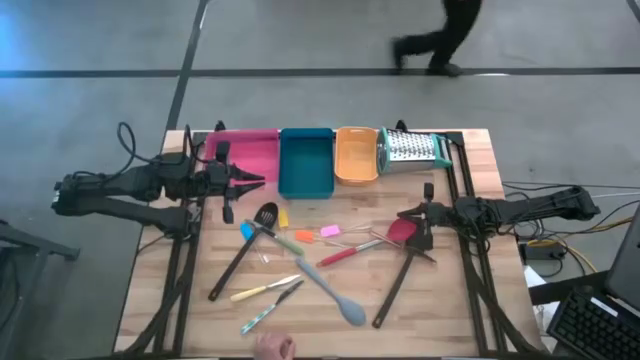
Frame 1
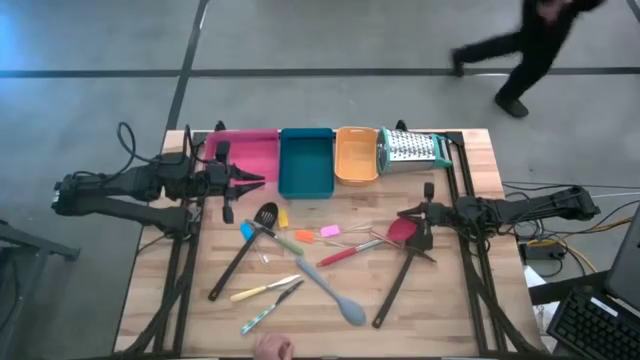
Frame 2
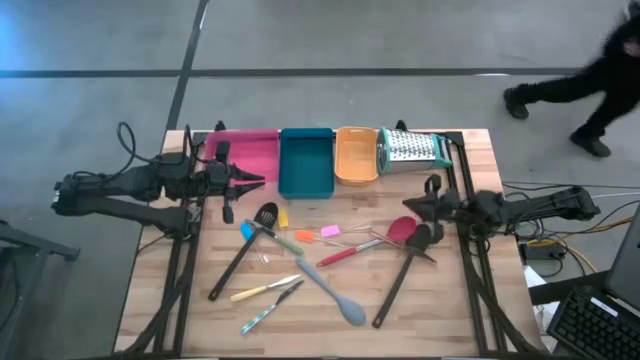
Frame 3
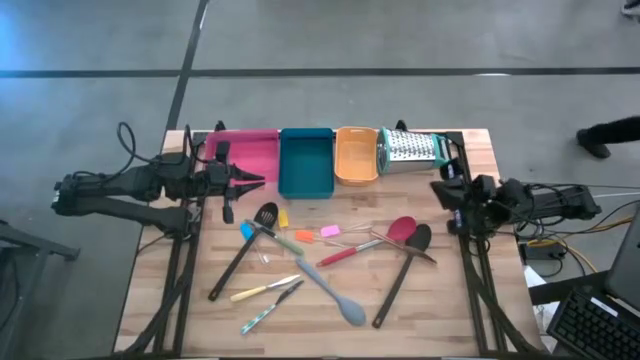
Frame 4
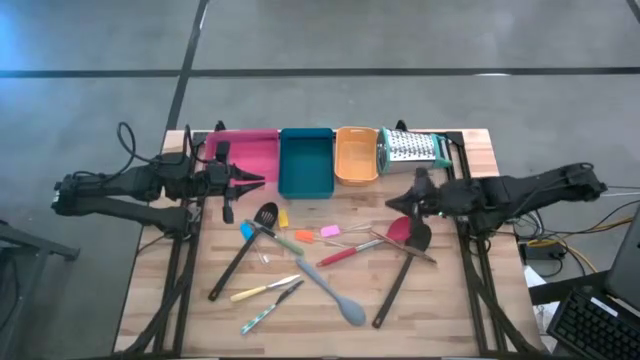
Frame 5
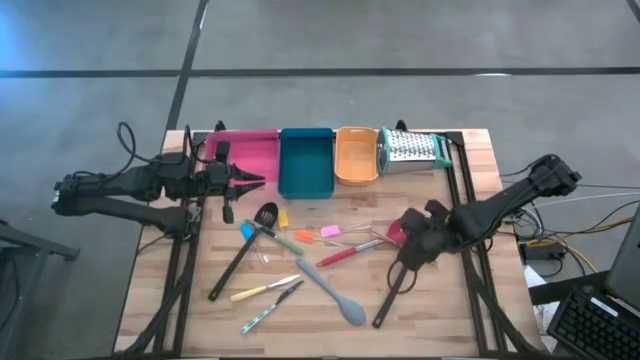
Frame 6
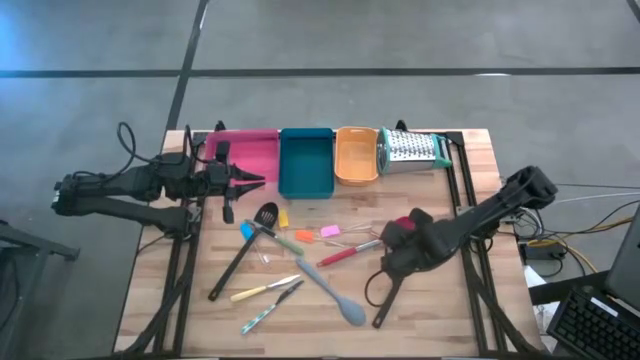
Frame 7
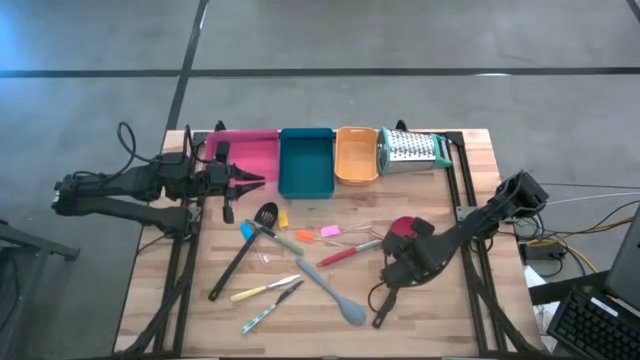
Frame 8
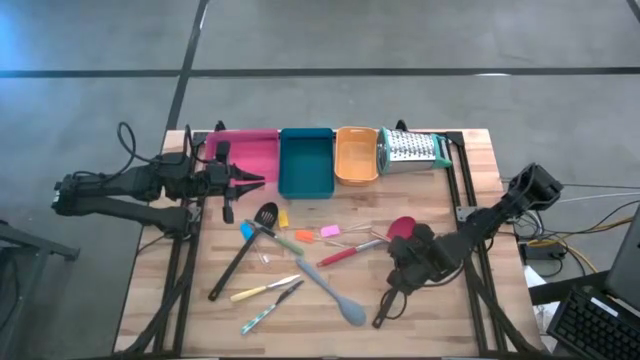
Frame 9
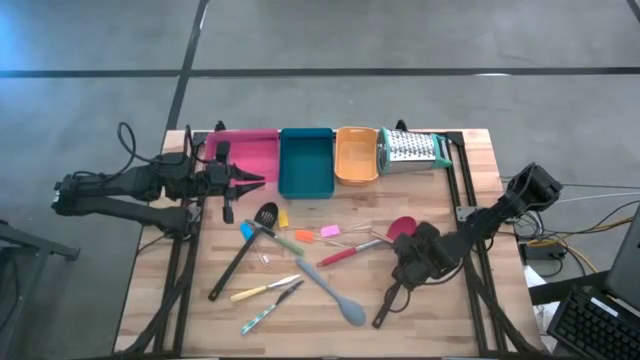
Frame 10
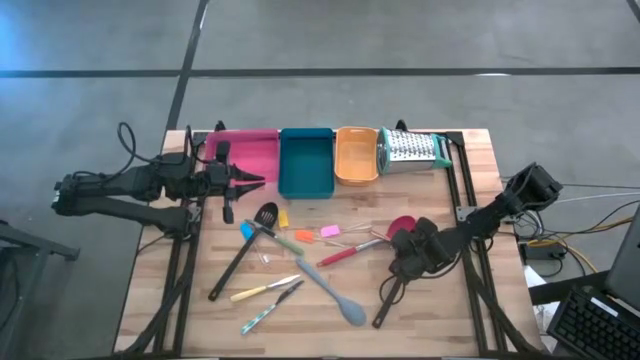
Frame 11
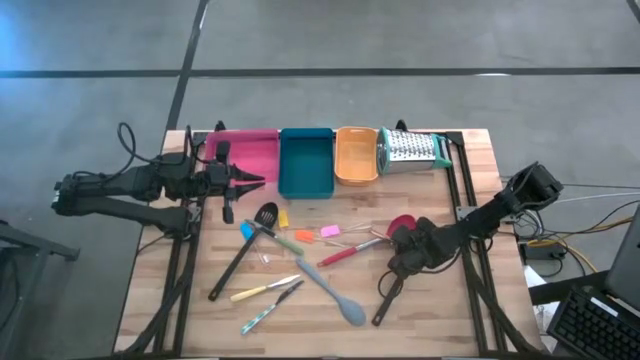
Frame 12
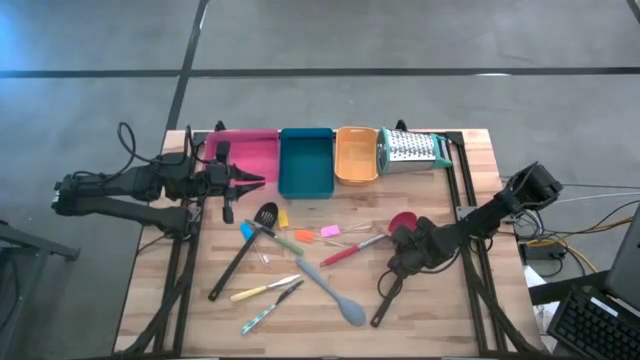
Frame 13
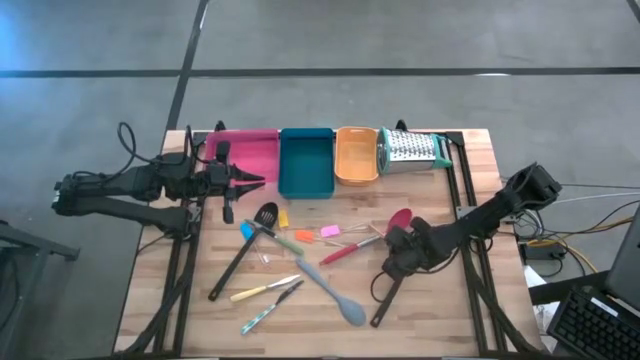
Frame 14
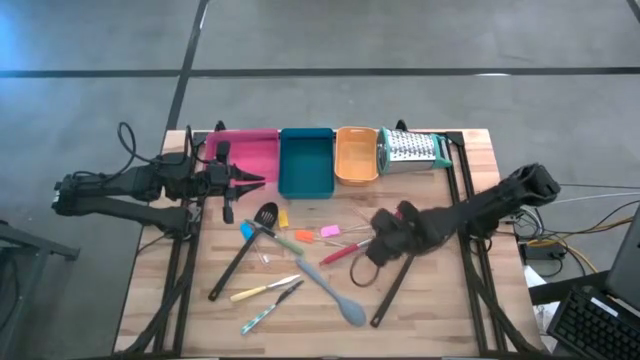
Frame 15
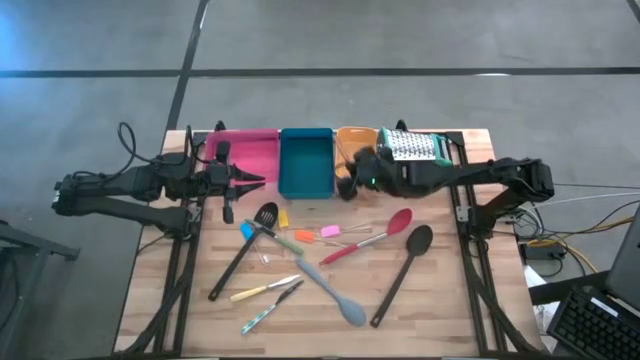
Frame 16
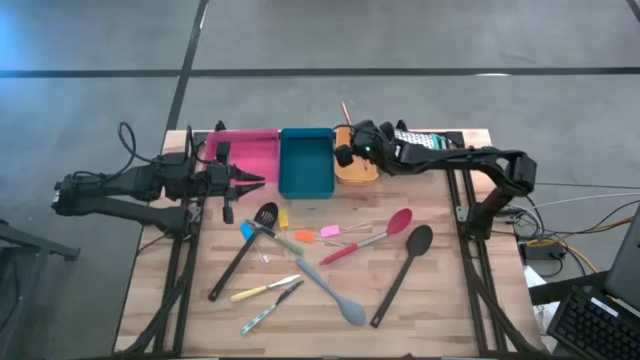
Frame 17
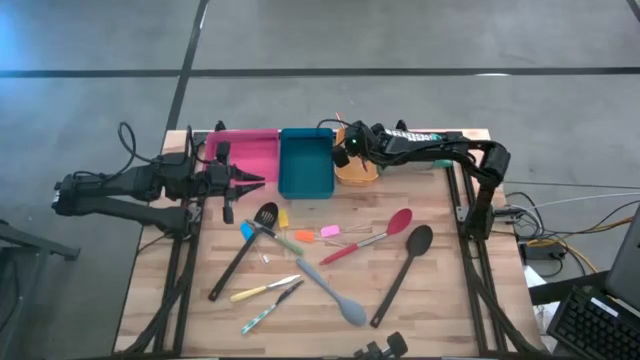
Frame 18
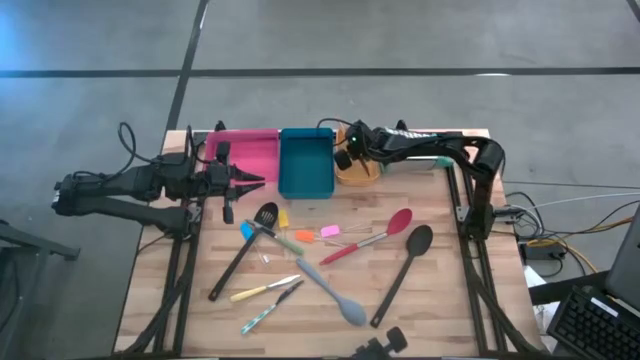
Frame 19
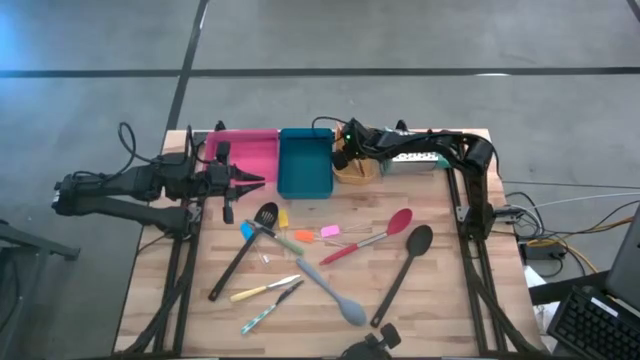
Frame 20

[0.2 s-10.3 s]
Task: Pick & Place Kitchen Items
Put the gold knife into the yellow bin

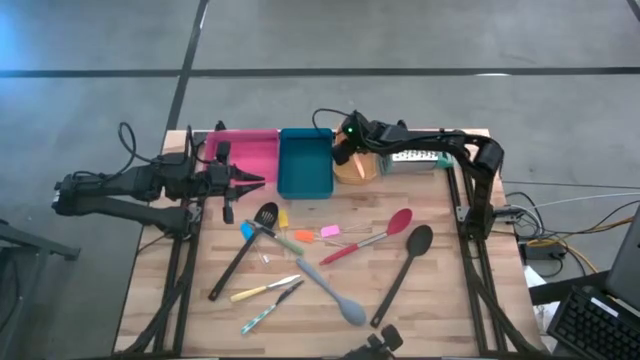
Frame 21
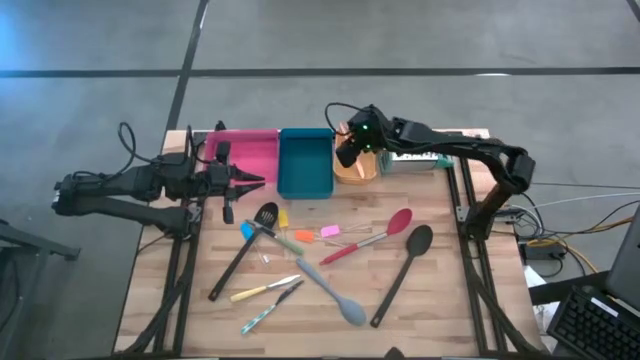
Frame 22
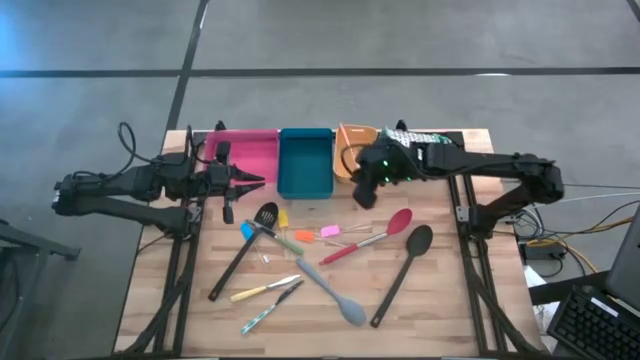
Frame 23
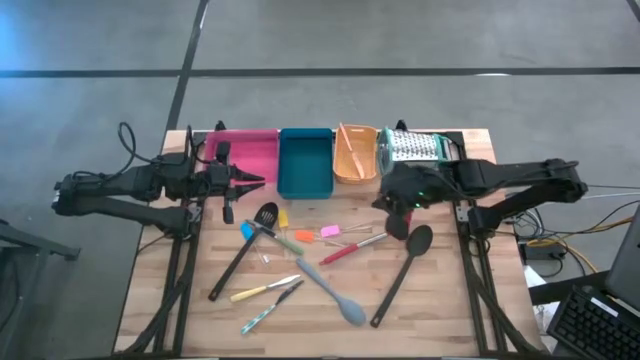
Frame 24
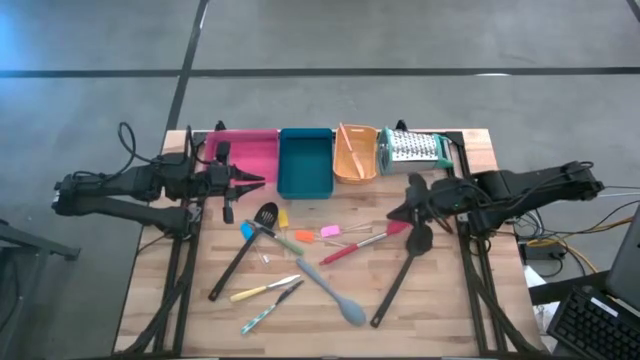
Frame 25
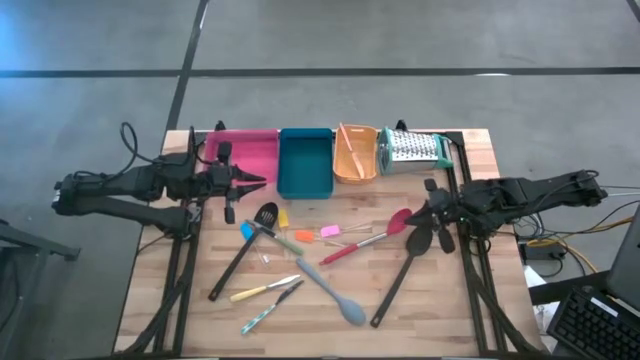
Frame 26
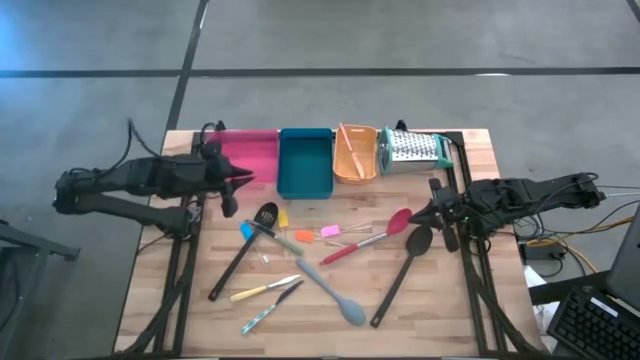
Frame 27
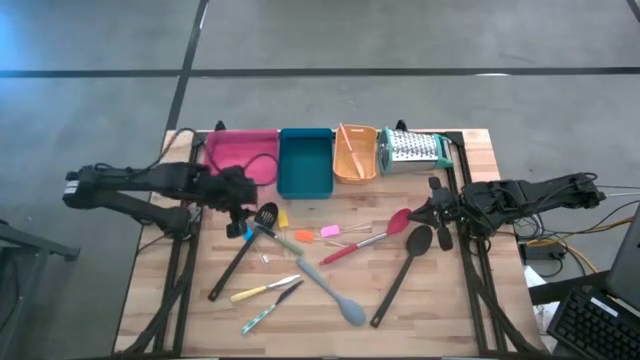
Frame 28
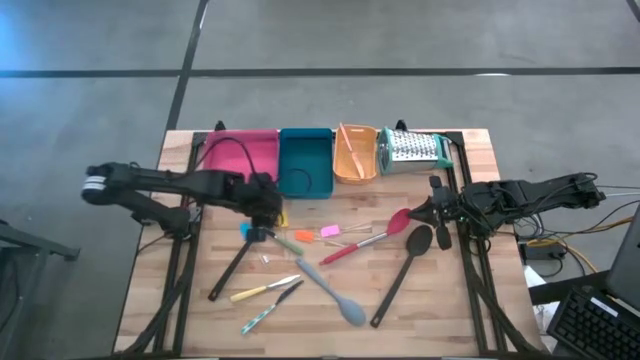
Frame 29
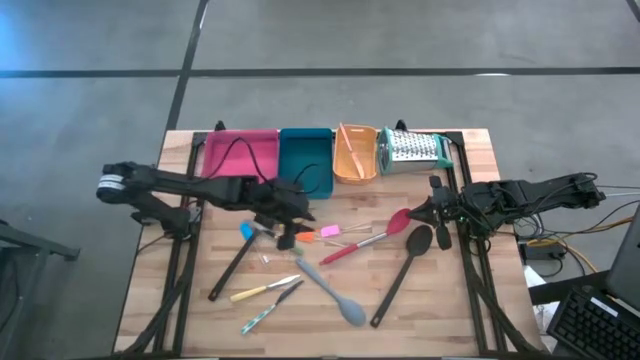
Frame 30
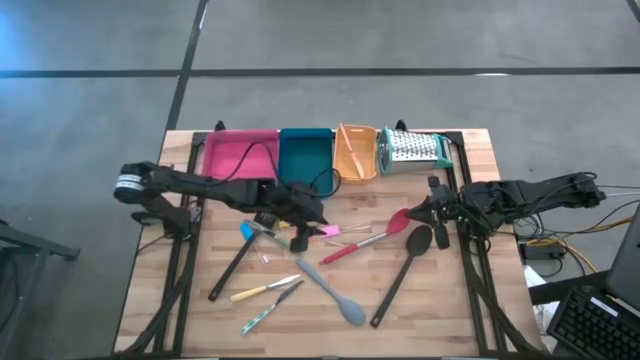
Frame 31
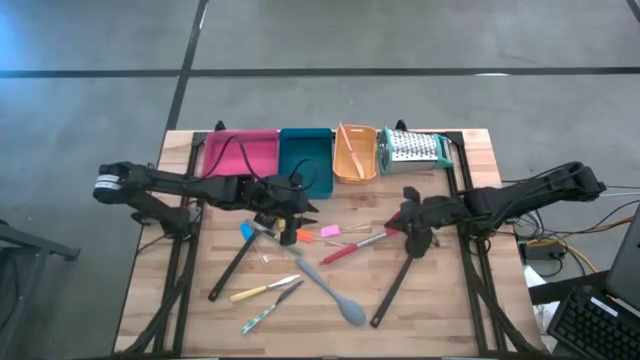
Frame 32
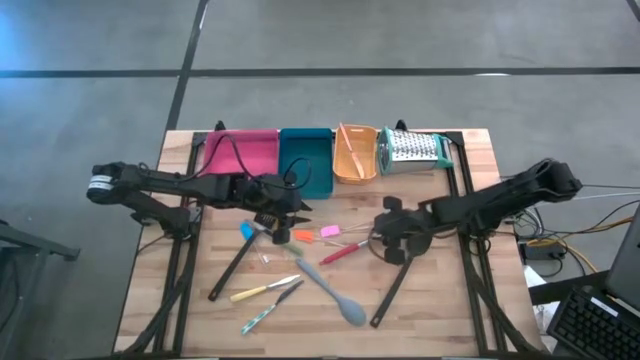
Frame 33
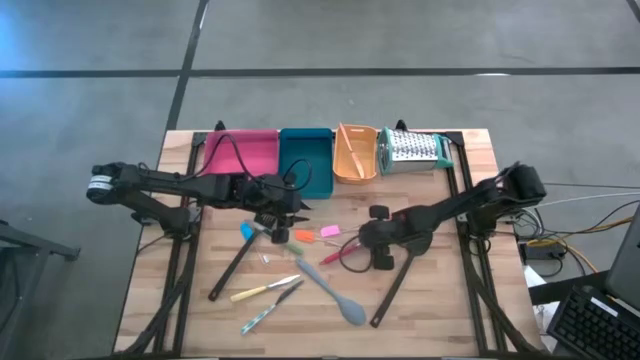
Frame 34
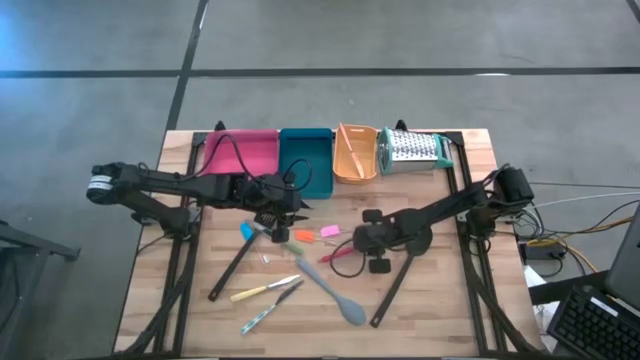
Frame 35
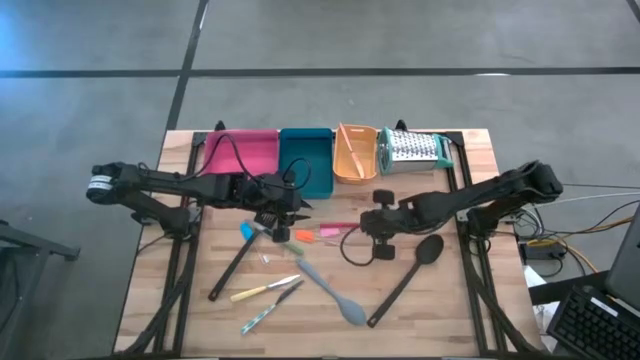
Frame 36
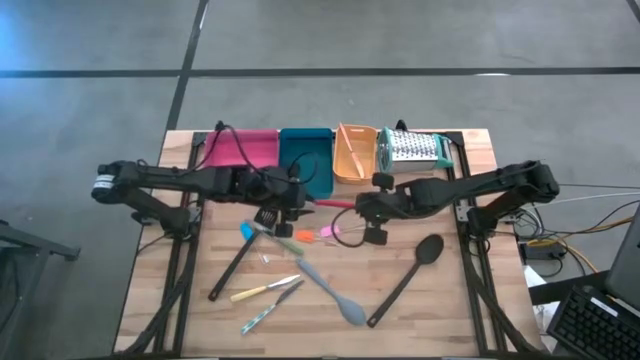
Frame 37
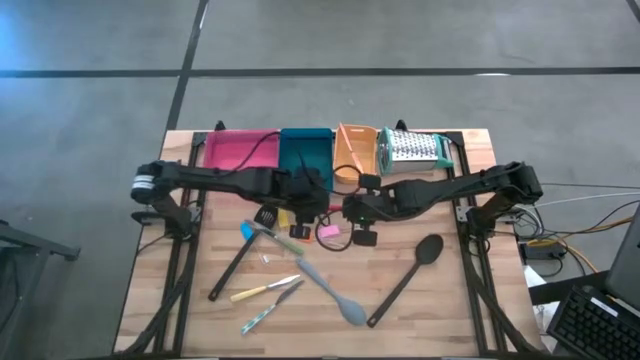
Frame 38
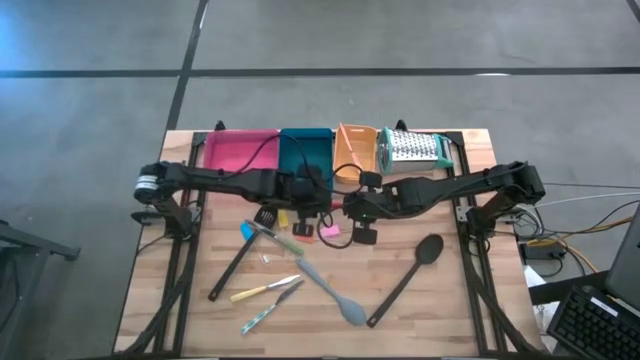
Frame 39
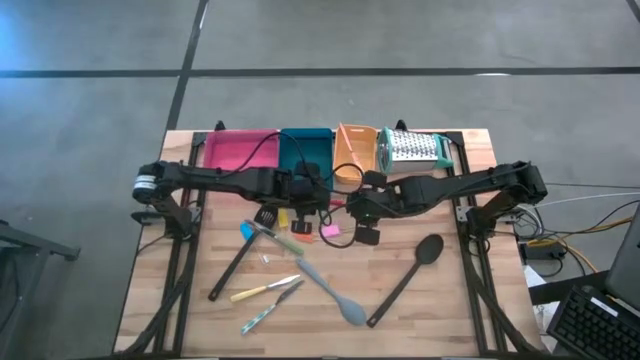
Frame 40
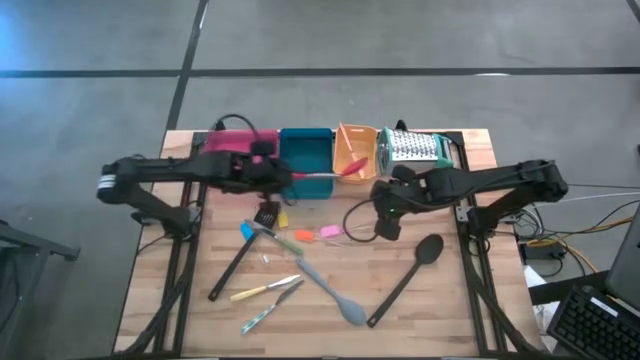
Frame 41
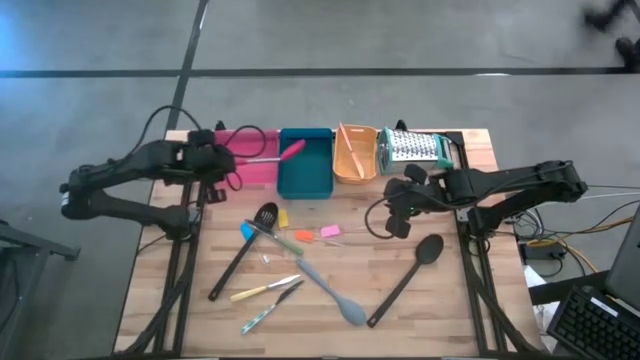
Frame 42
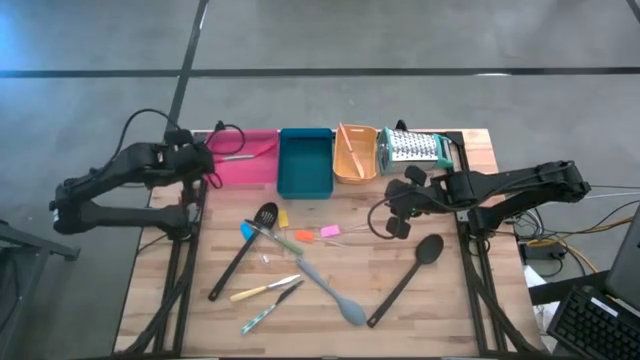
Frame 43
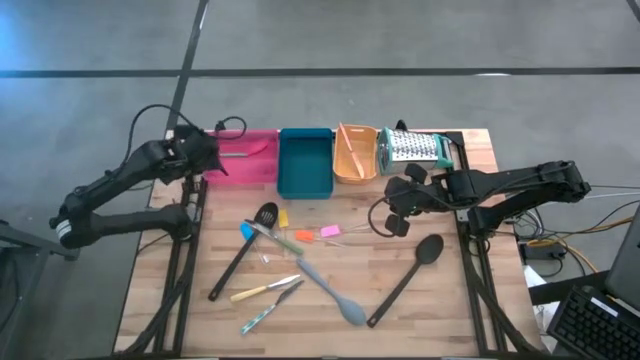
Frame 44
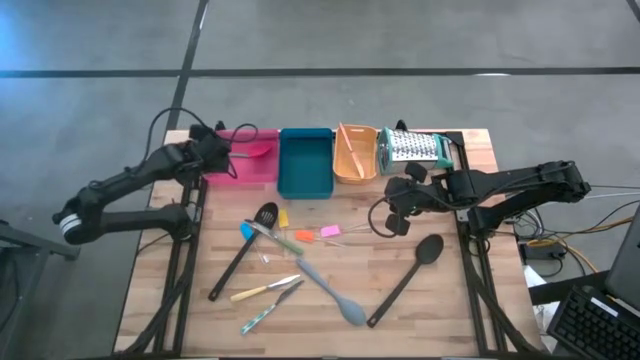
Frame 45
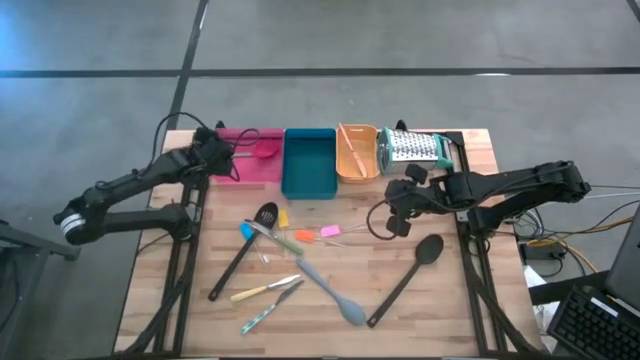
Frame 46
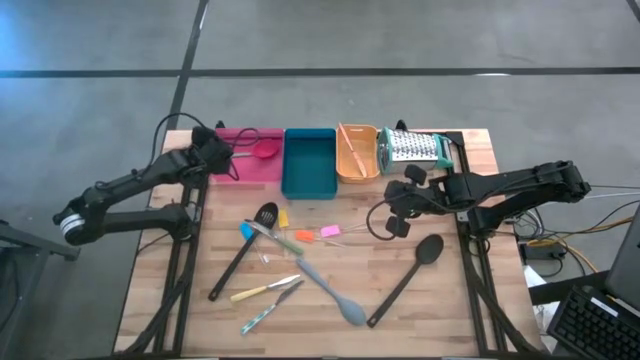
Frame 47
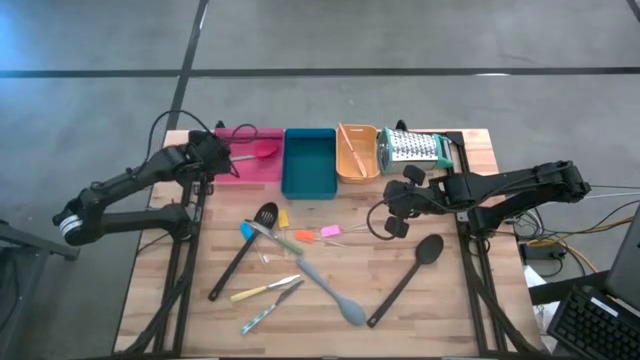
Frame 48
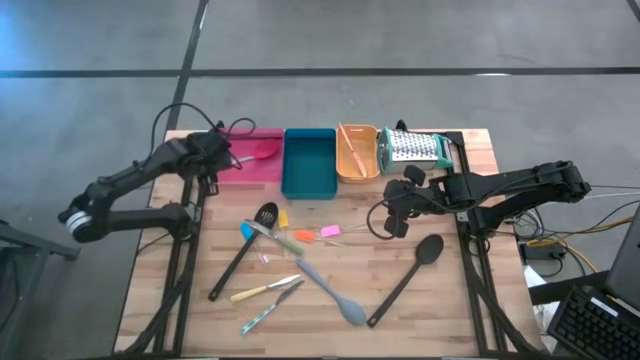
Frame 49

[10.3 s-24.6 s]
Put the red spoon into the pink bin
